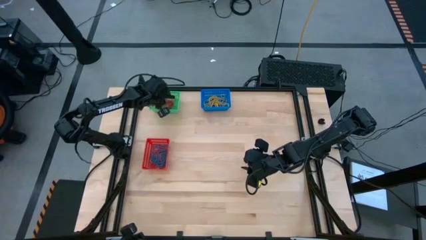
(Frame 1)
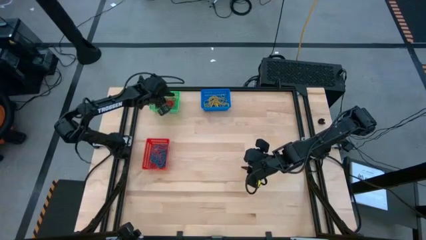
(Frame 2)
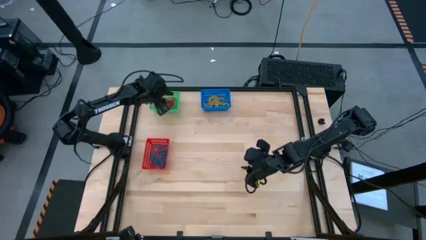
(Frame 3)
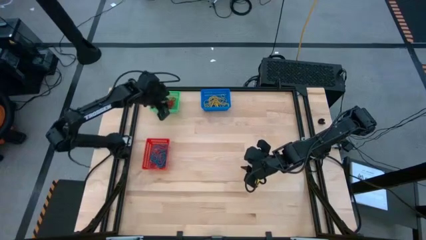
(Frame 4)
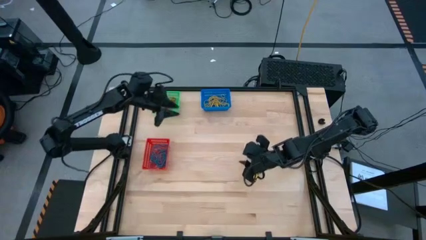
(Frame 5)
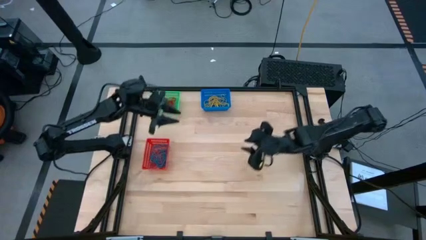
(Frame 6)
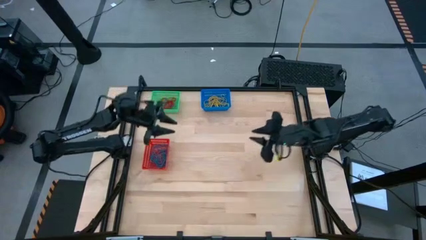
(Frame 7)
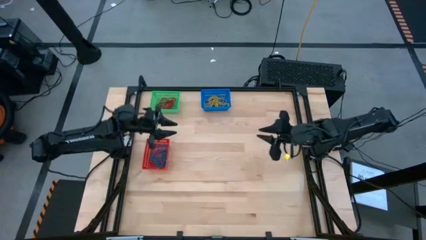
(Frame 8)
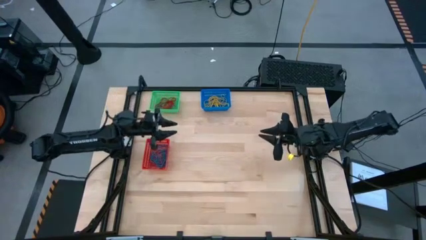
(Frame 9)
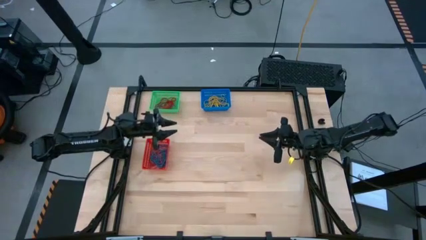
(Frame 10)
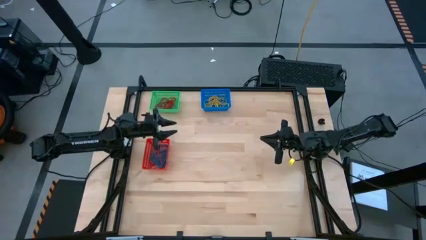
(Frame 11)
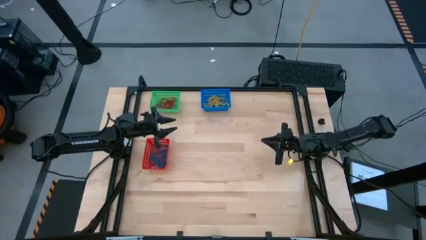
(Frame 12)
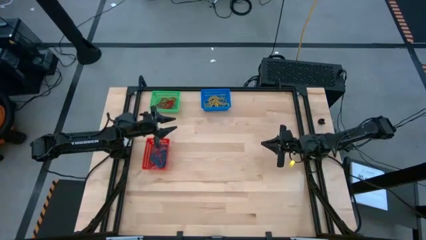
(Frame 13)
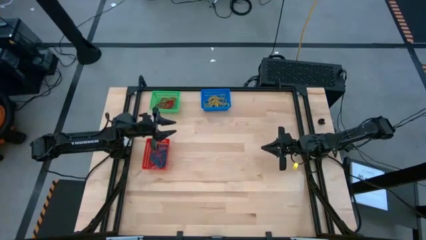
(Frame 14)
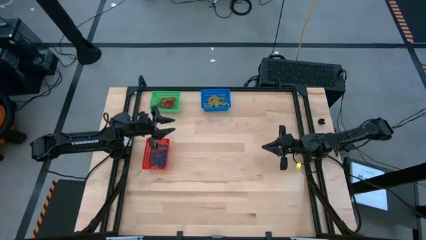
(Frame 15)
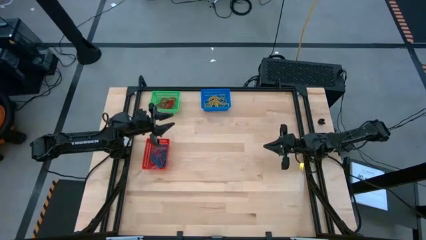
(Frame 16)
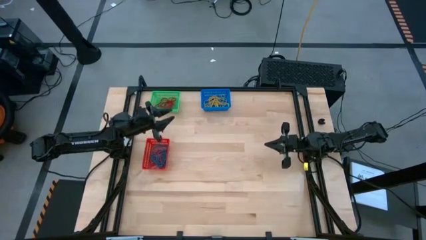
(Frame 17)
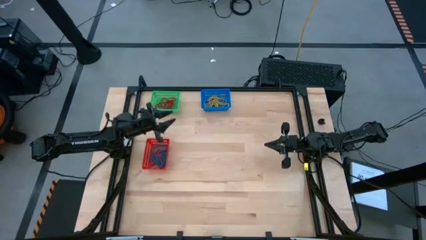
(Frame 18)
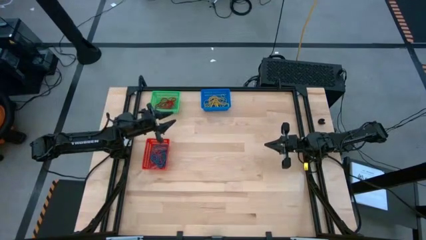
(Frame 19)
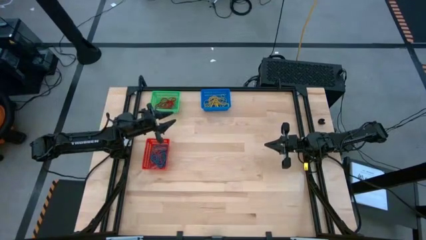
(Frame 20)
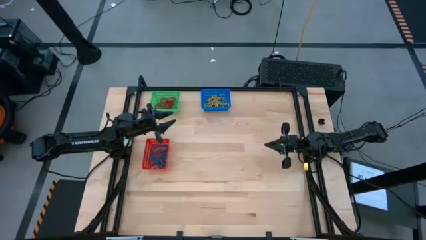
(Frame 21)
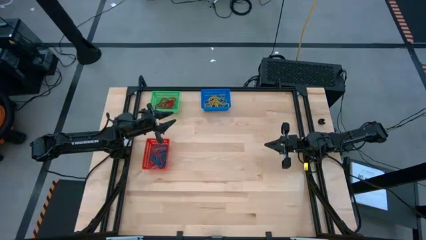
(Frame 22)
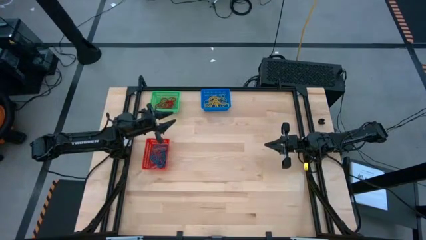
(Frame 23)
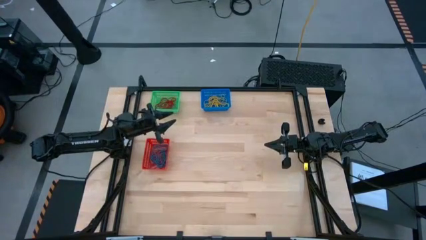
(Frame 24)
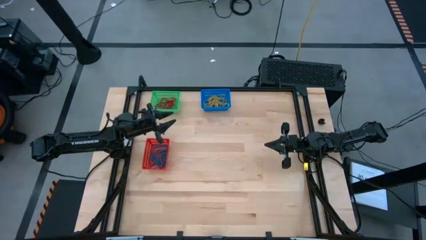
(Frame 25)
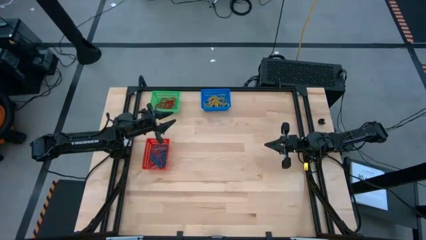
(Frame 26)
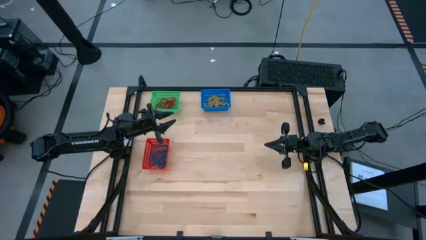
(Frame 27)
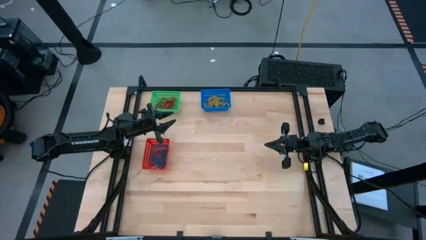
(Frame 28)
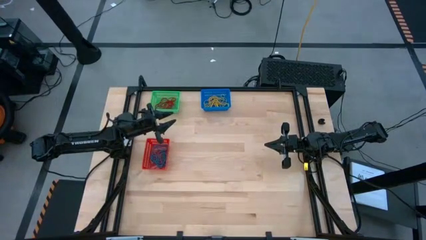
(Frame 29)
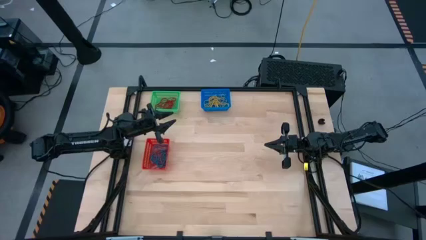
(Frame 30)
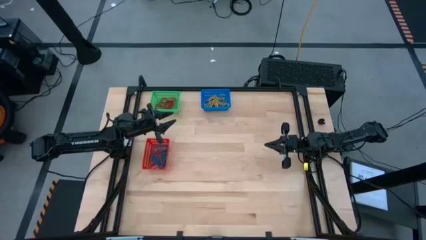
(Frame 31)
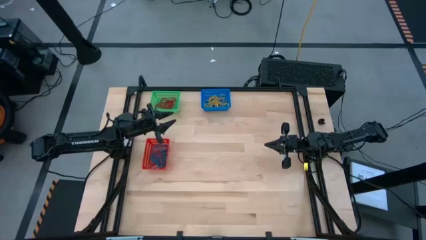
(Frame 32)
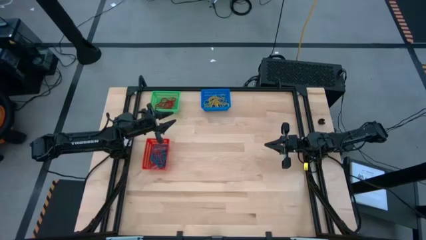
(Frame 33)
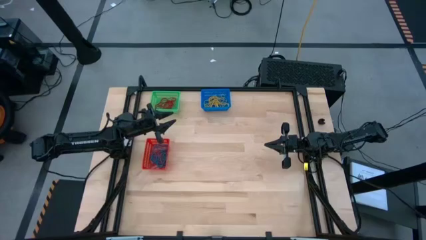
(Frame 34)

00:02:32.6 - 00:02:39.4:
Task: Sort rubber bands into baskets
Return to Home Position

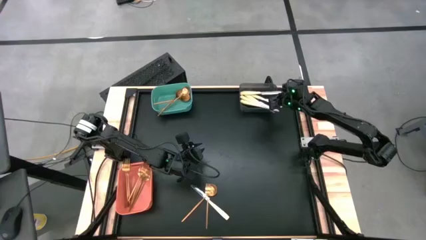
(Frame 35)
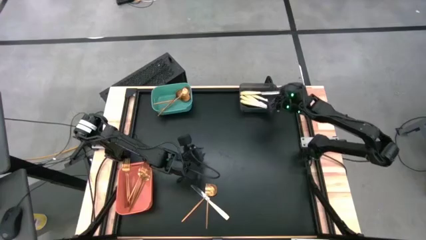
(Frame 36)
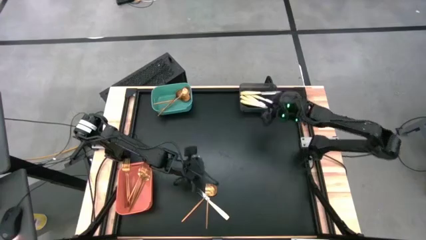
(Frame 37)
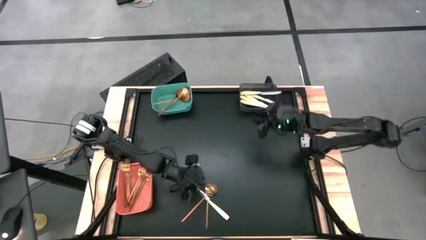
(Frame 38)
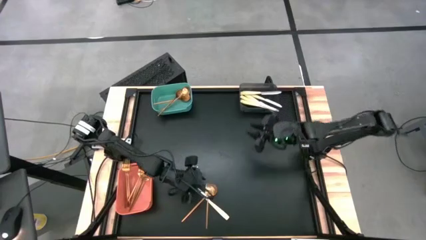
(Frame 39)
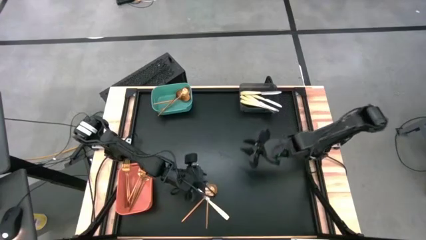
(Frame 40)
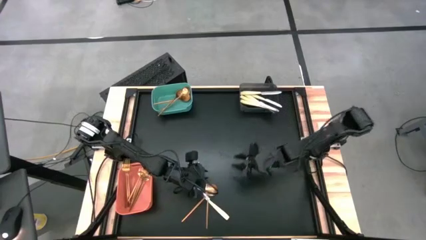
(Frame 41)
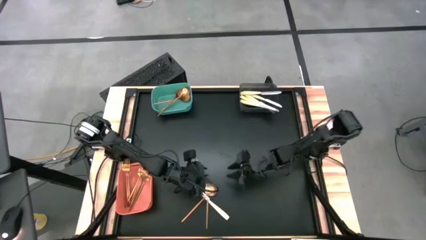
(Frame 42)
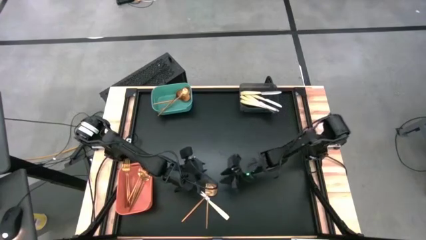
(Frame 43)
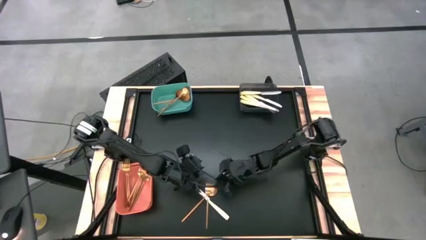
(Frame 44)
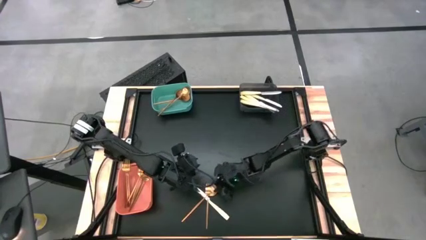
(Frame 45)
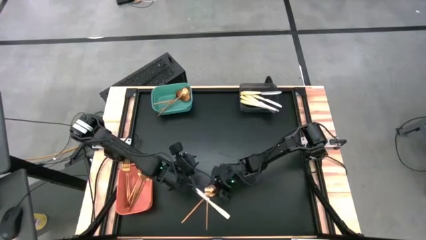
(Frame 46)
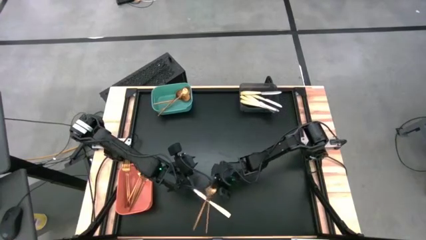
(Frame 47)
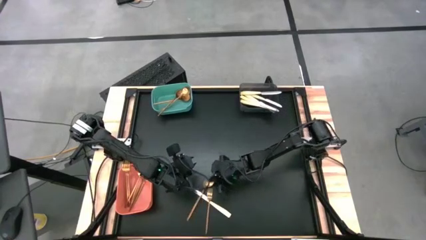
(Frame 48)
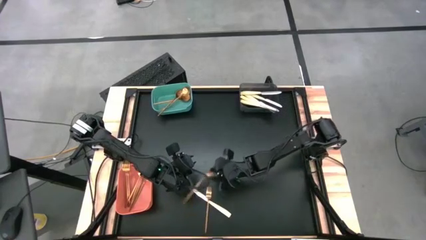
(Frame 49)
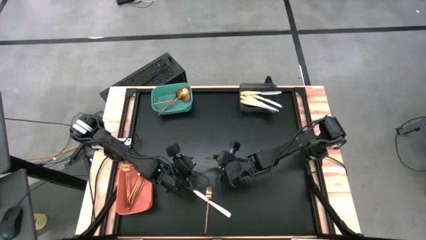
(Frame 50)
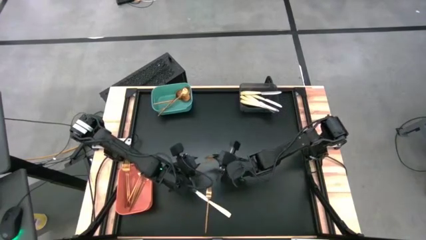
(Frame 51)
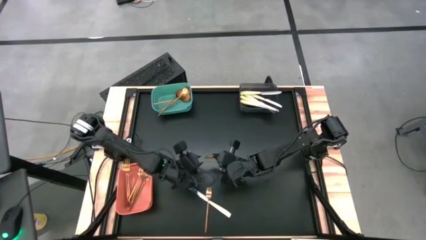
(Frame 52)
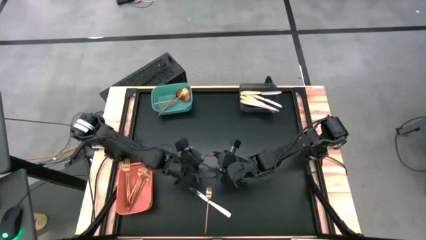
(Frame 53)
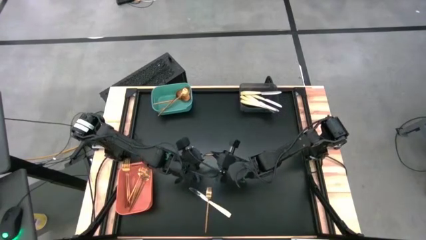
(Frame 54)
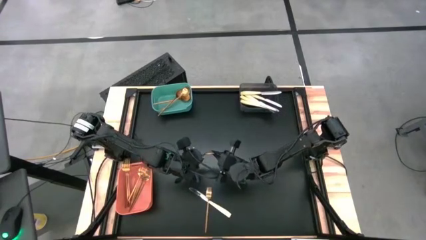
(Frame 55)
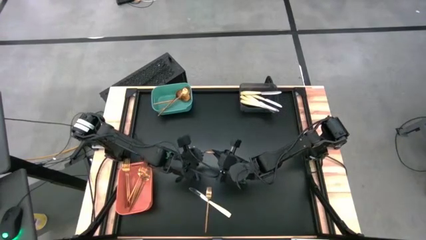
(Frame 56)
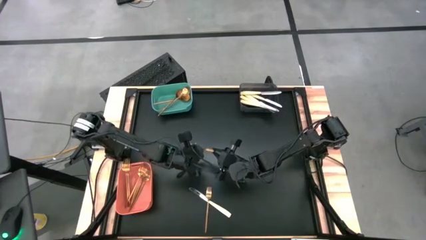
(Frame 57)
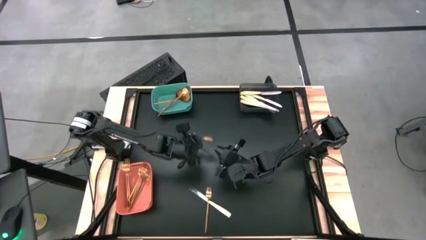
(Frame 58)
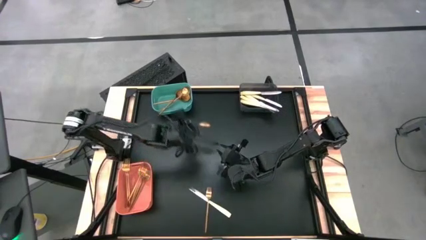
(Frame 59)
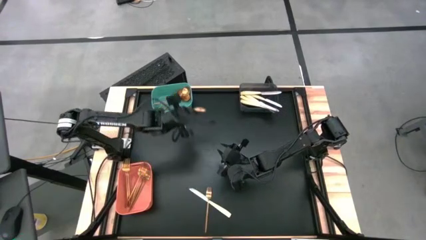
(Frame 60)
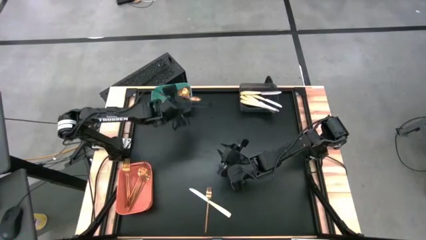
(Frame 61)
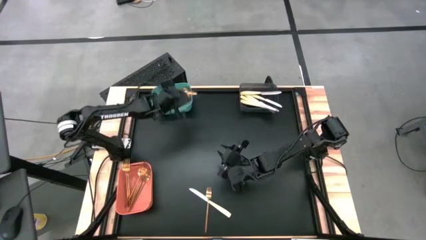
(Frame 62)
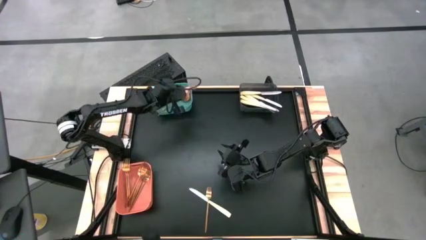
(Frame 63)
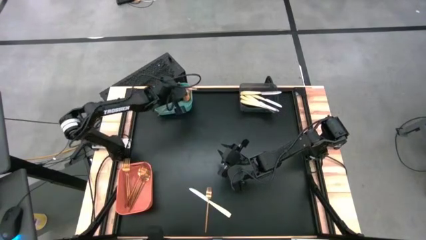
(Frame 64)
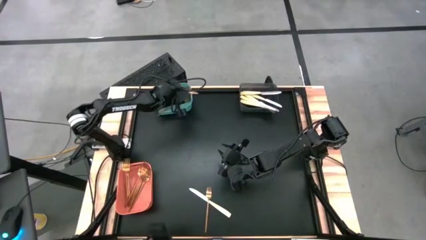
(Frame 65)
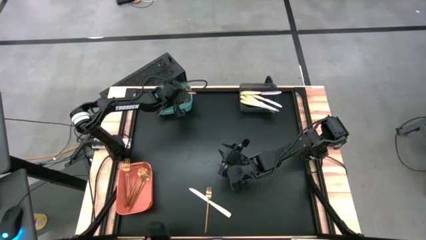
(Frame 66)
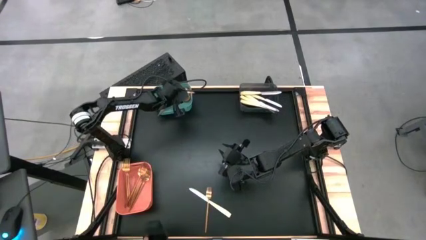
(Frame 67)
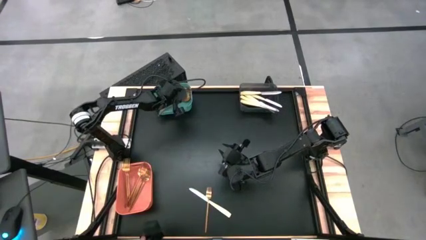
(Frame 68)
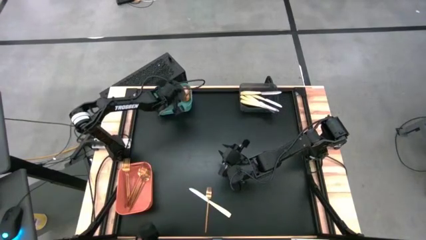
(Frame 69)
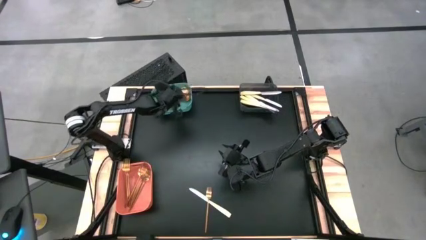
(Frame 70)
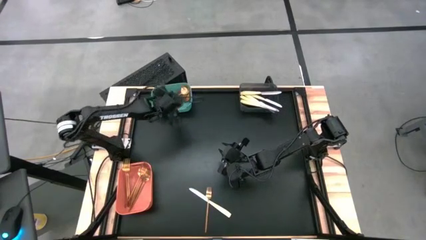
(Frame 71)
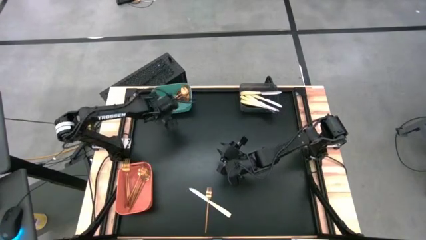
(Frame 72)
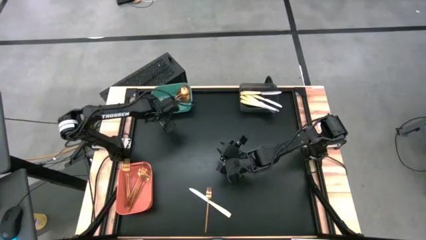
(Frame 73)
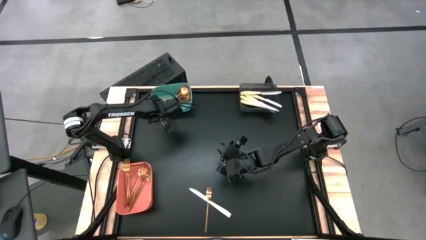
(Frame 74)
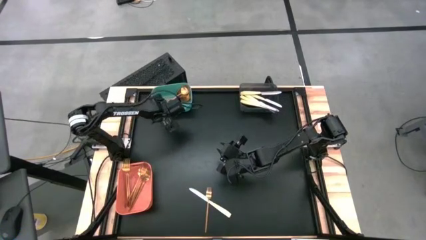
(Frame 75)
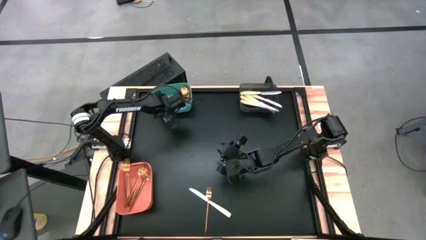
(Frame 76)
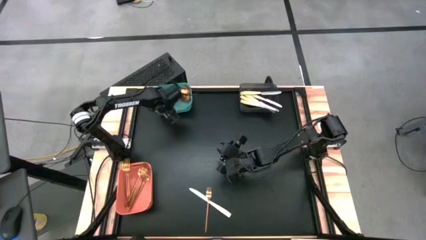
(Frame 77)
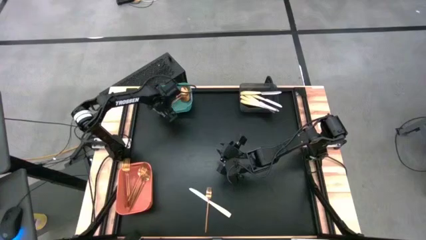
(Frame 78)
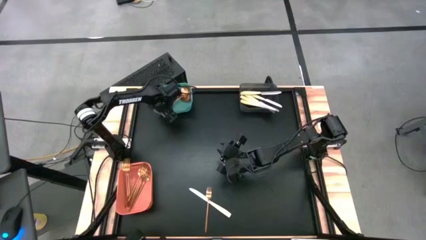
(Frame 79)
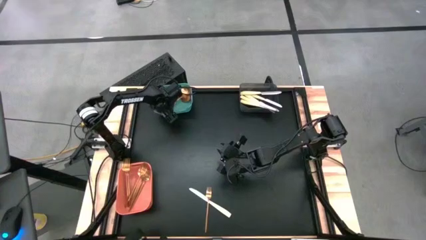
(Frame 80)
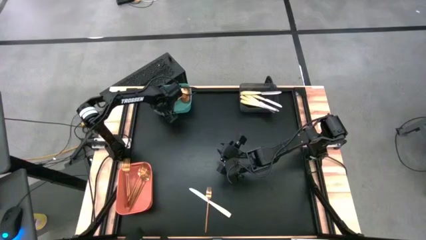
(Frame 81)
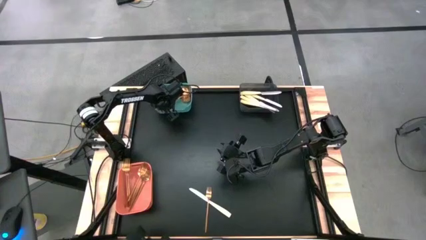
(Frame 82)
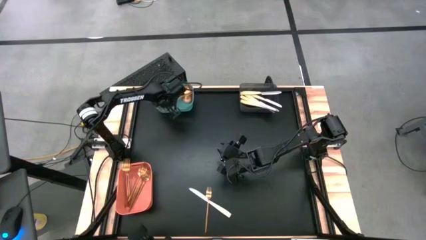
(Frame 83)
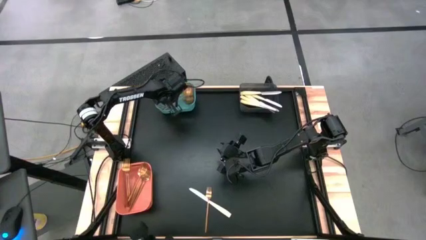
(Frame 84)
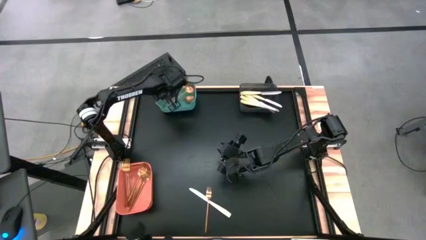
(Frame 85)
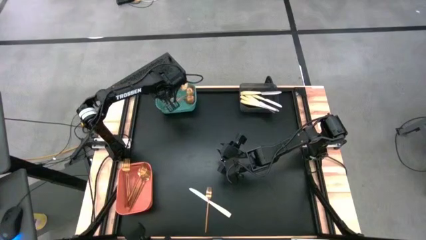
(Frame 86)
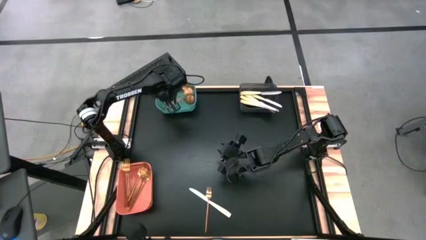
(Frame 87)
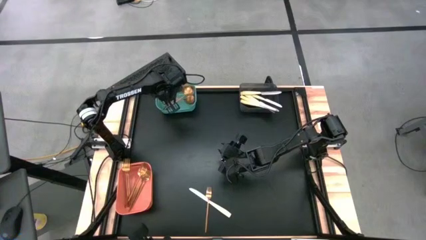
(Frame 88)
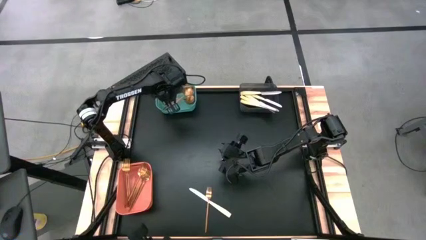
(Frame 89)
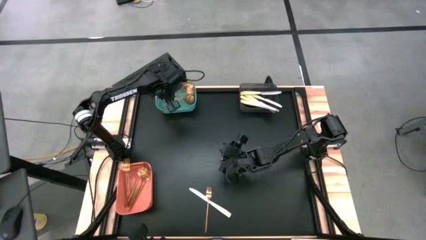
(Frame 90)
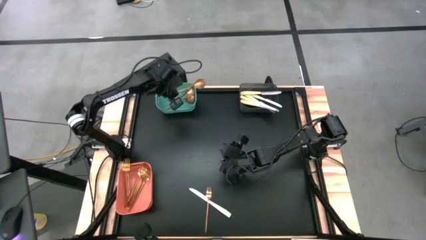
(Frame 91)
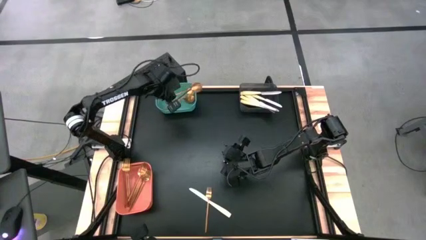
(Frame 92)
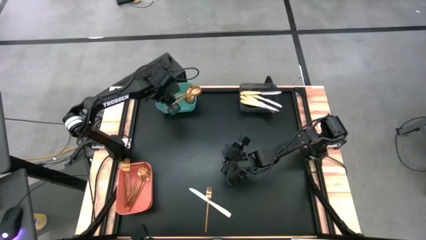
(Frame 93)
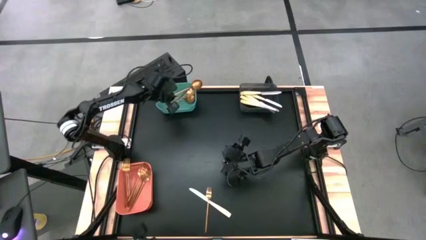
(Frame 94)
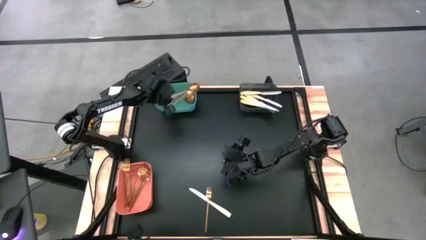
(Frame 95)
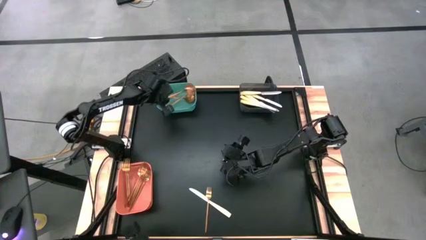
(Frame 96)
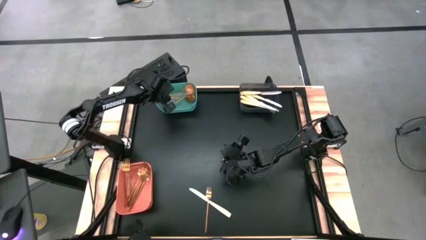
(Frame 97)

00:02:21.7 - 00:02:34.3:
Task: Sort silverware by color (type)
Put the gold spoon into the green bin
